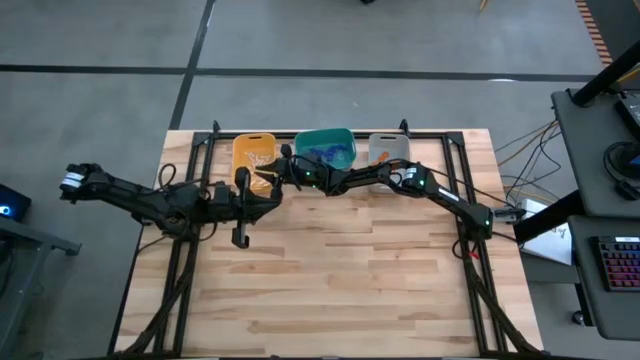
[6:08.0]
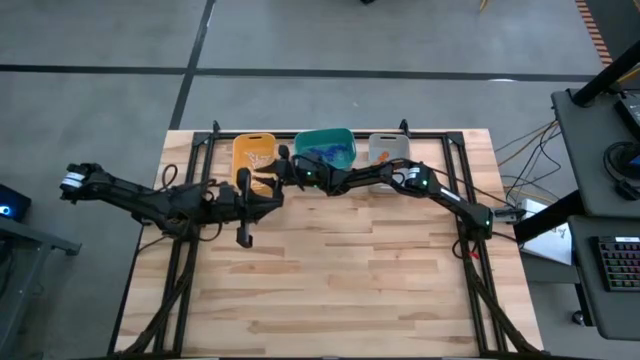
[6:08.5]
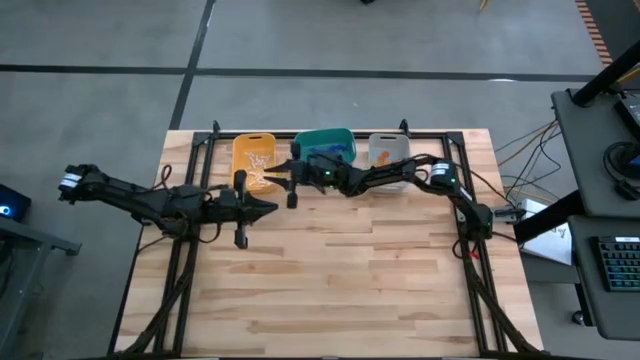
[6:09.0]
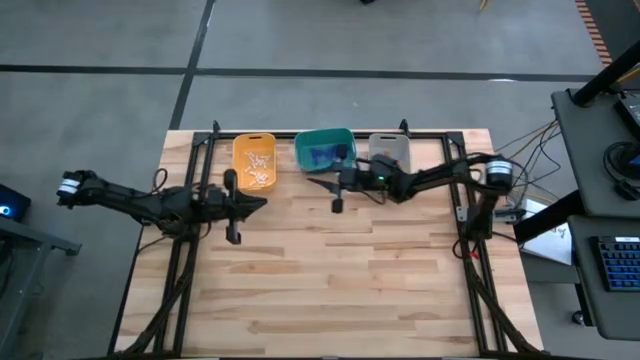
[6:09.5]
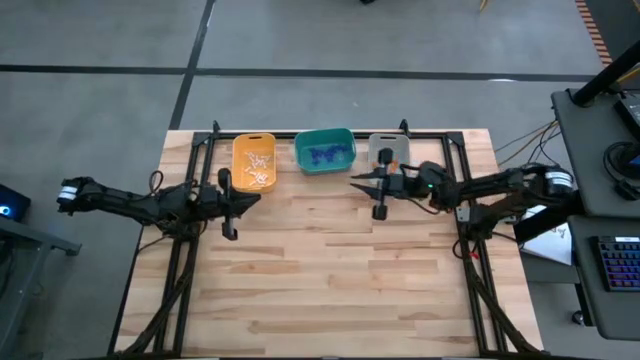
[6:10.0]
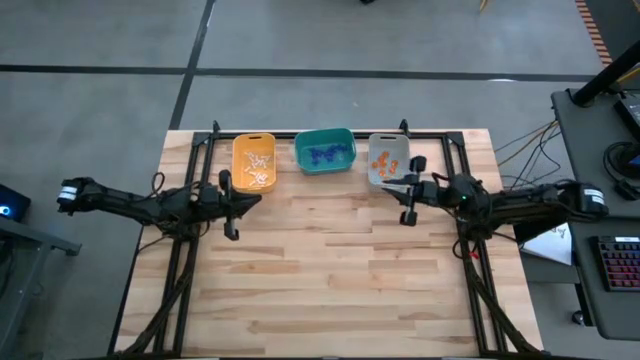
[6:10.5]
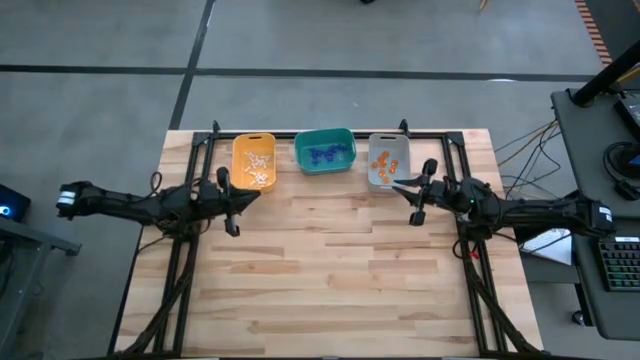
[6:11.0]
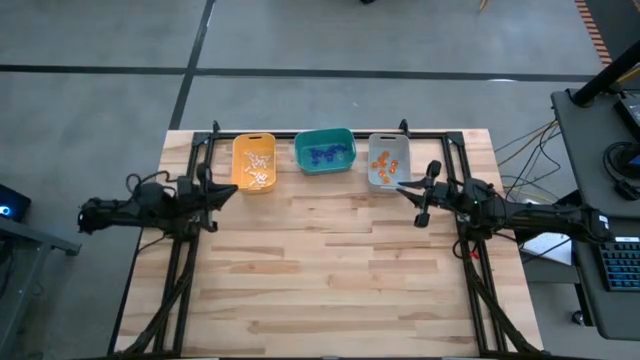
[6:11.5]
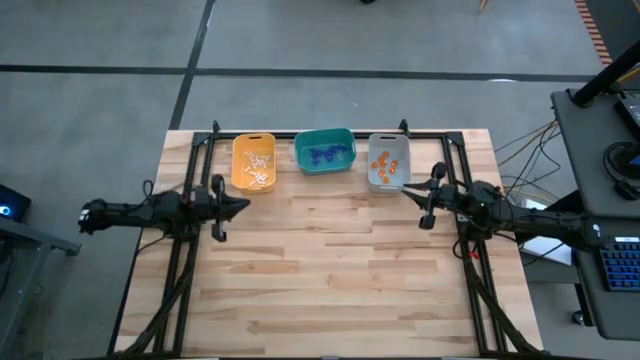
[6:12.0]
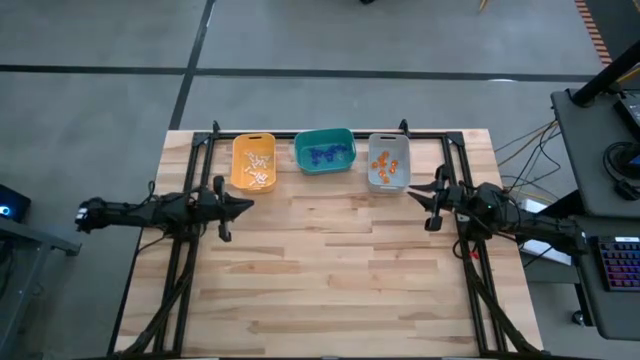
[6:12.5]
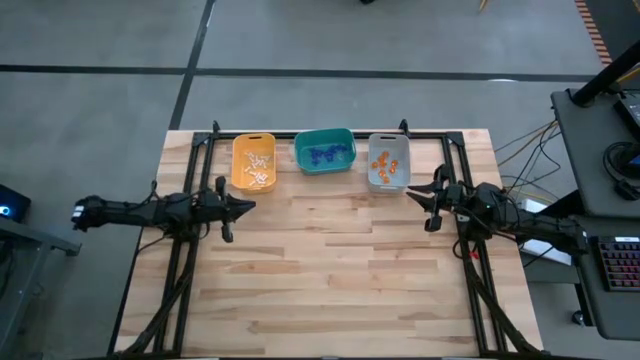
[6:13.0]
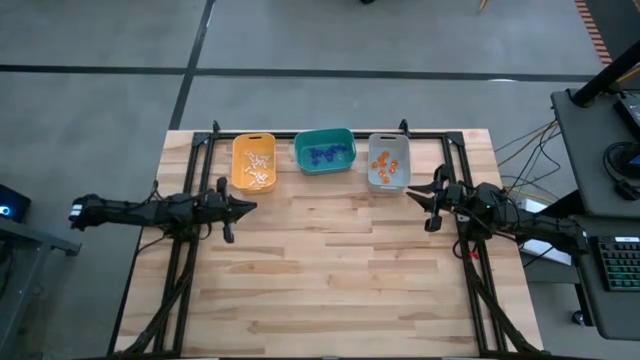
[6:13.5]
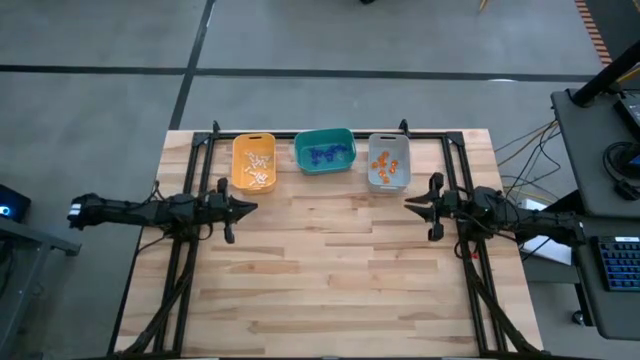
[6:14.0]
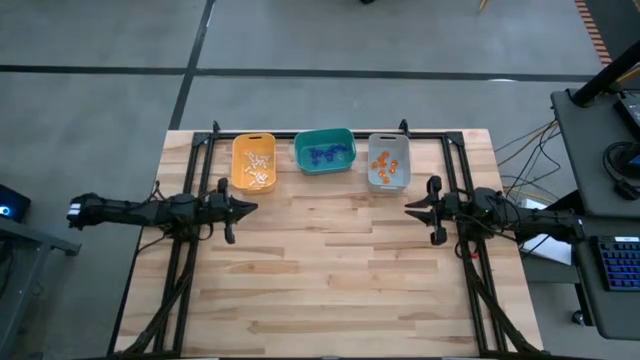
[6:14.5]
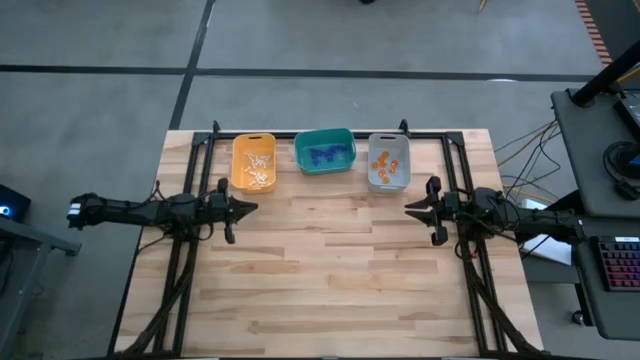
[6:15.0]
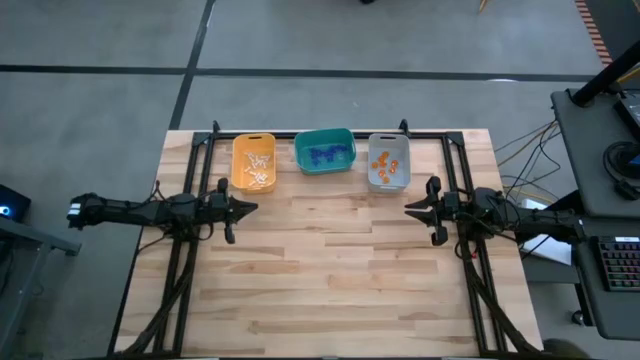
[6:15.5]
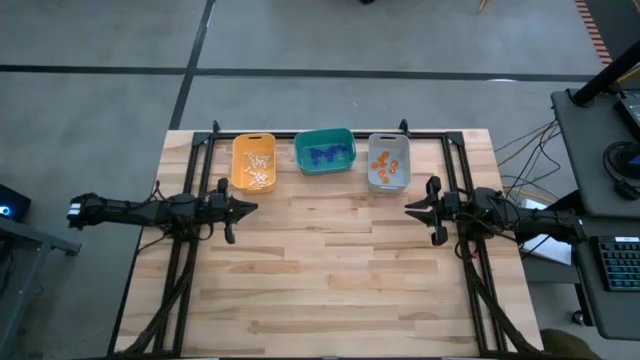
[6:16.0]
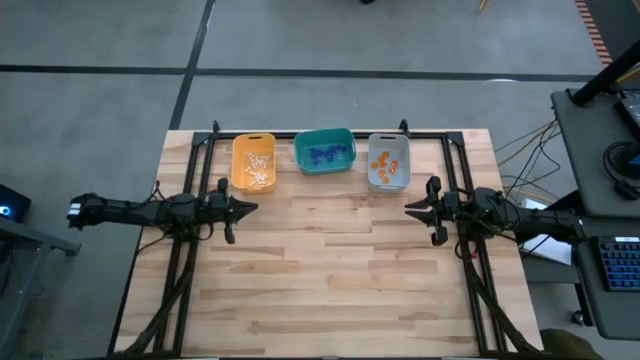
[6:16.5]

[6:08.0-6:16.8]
Task: Sort Halloween decoration
Return to Home Position

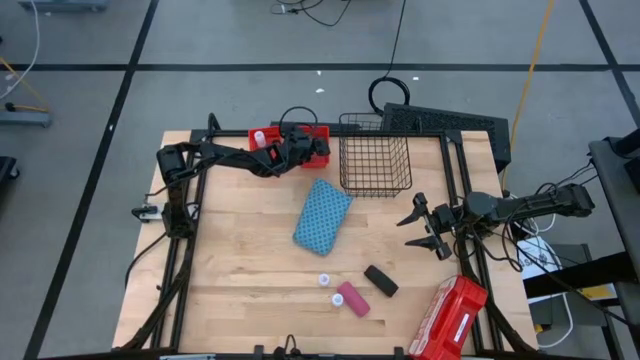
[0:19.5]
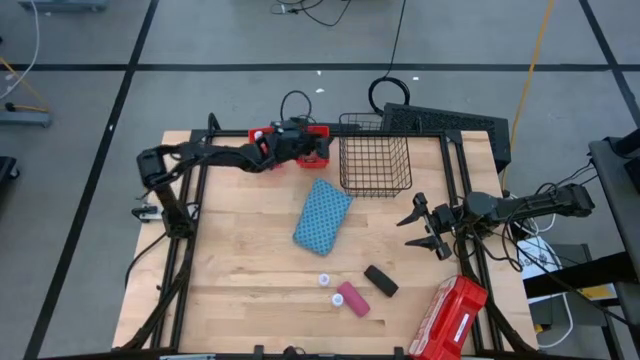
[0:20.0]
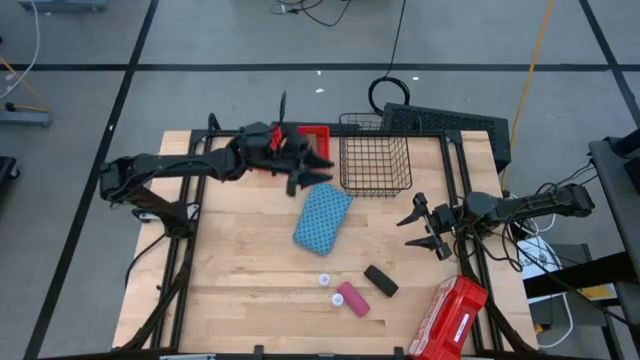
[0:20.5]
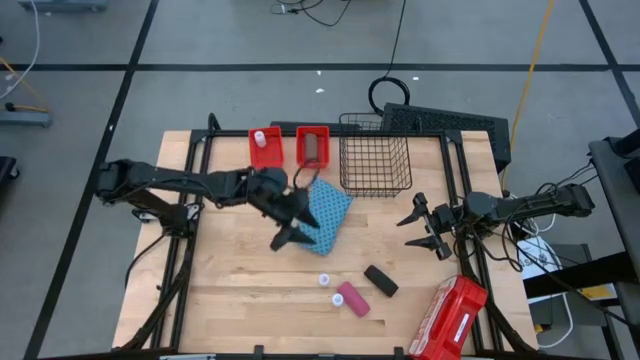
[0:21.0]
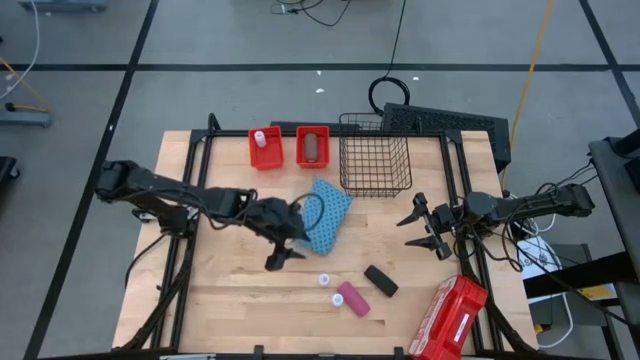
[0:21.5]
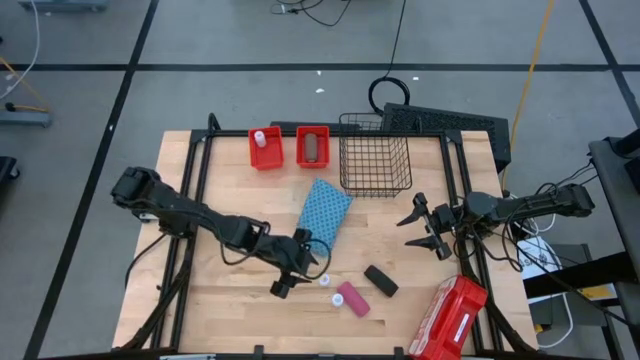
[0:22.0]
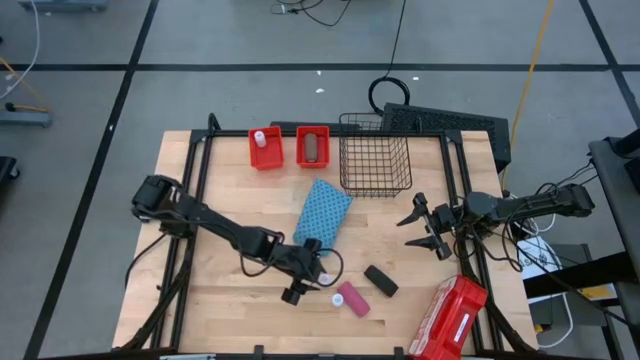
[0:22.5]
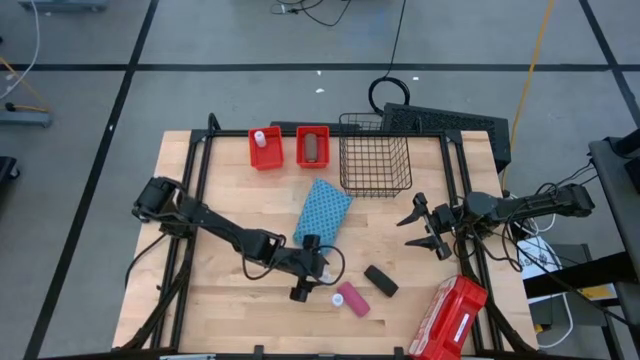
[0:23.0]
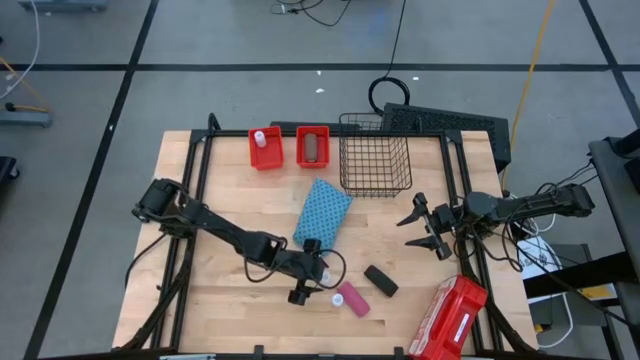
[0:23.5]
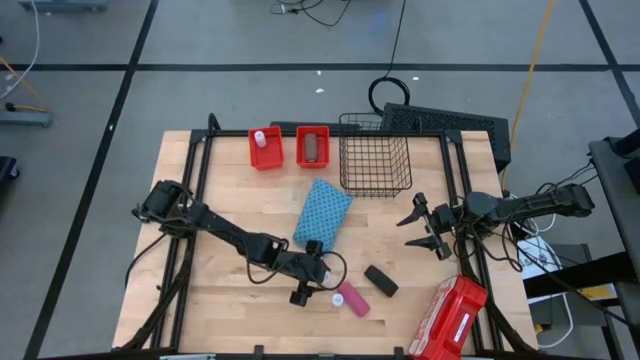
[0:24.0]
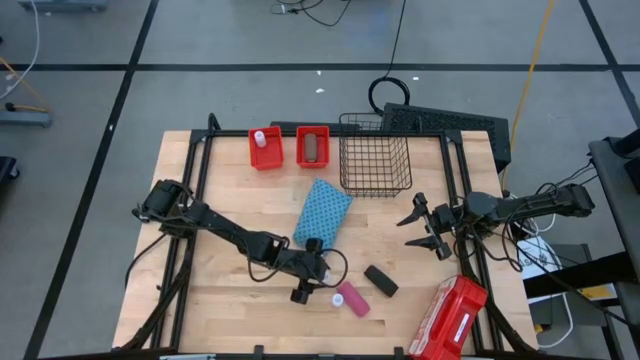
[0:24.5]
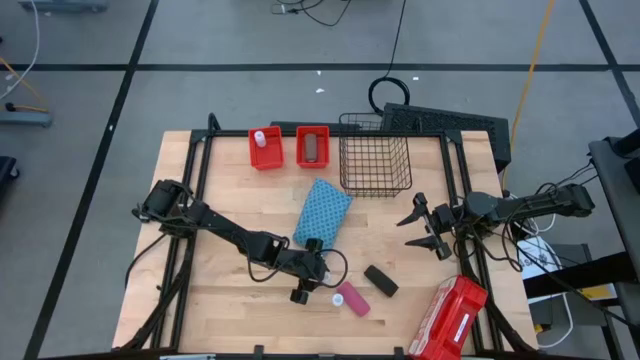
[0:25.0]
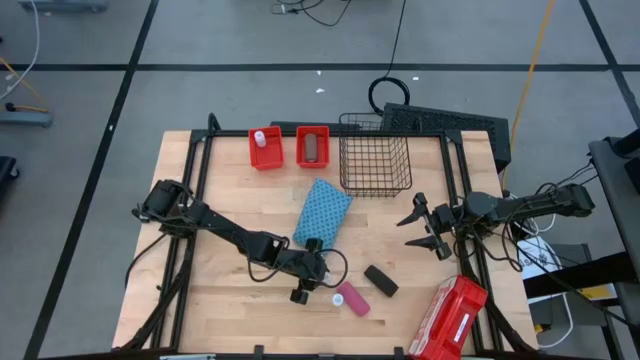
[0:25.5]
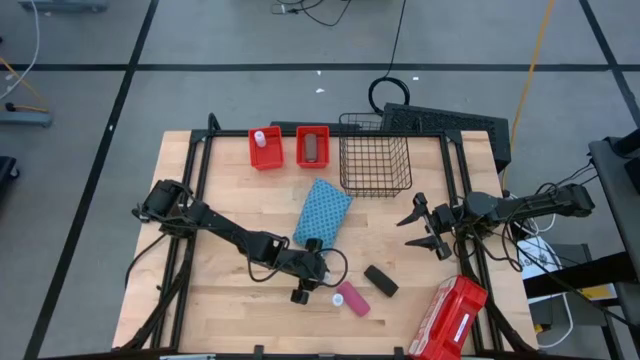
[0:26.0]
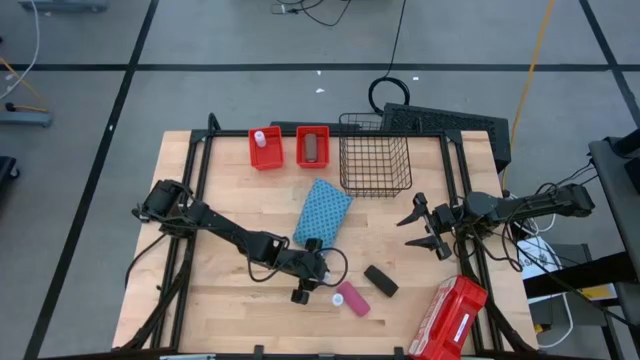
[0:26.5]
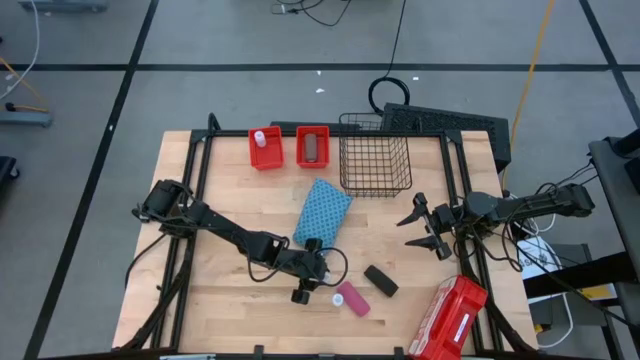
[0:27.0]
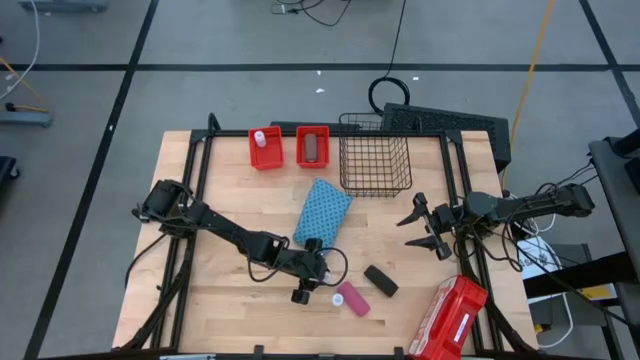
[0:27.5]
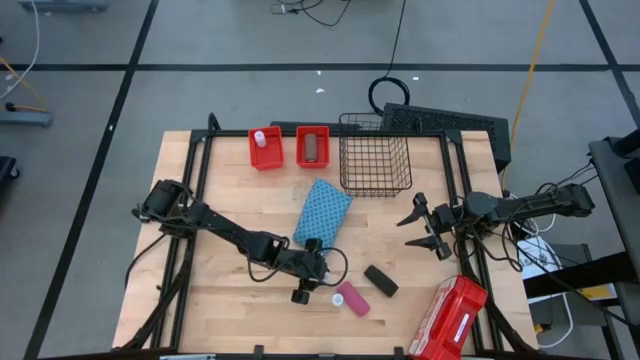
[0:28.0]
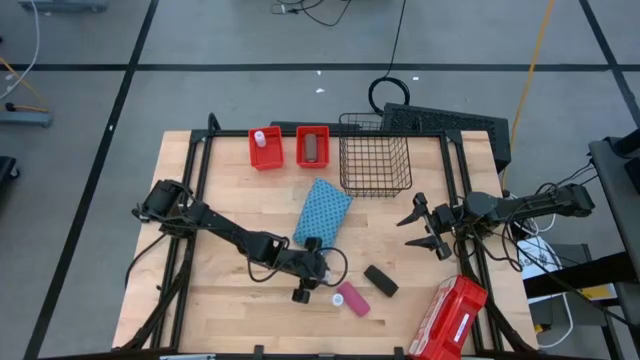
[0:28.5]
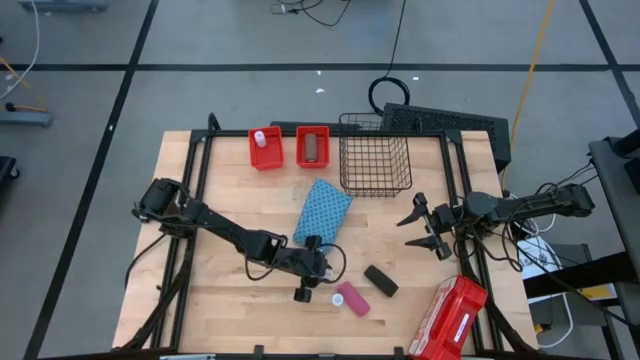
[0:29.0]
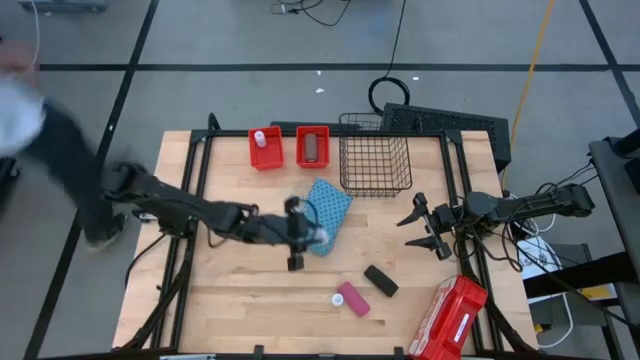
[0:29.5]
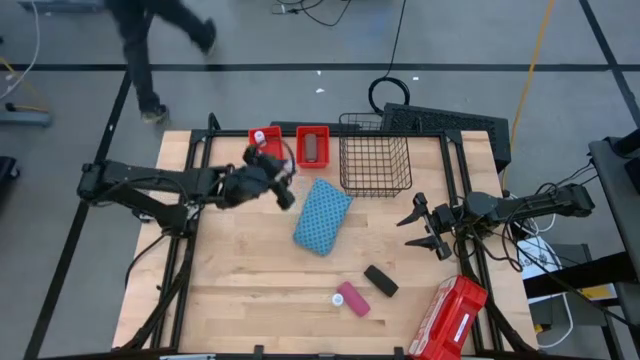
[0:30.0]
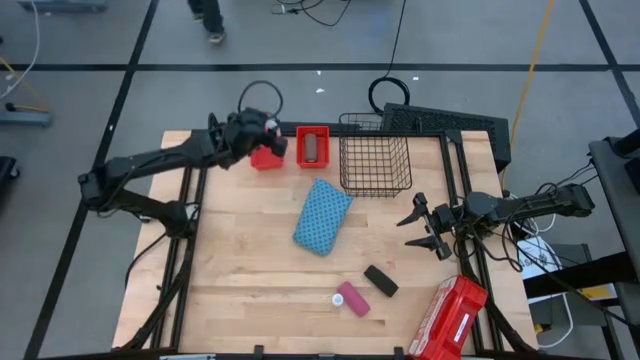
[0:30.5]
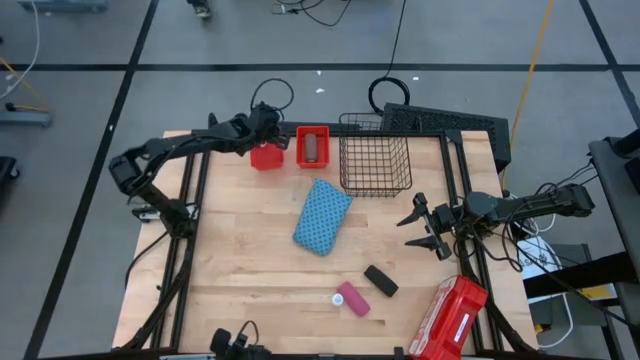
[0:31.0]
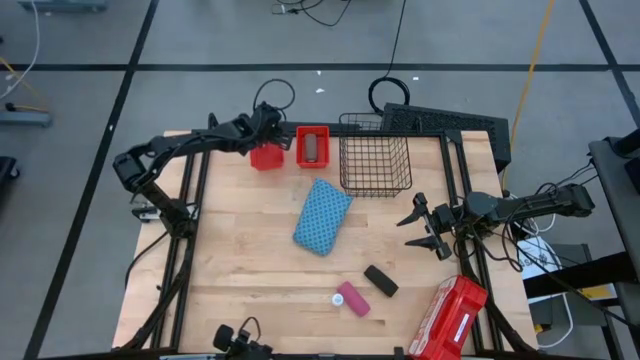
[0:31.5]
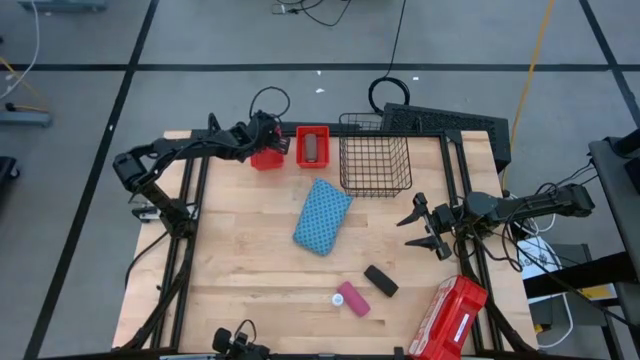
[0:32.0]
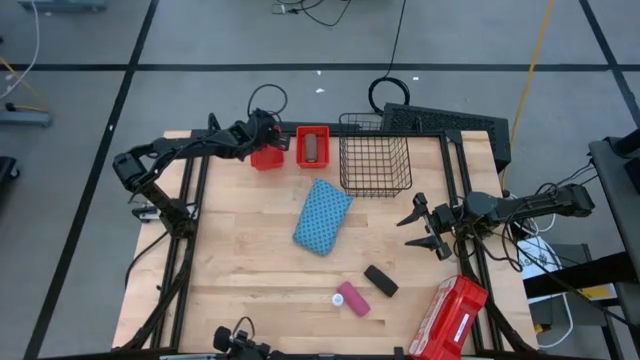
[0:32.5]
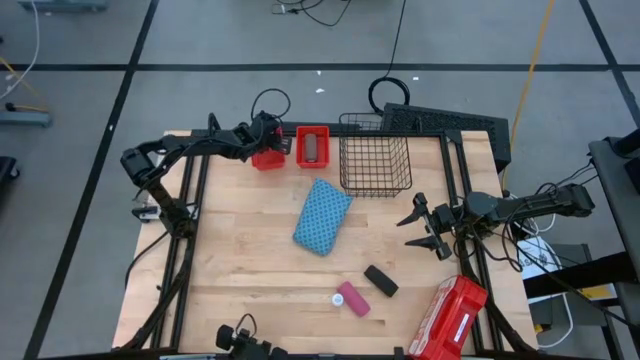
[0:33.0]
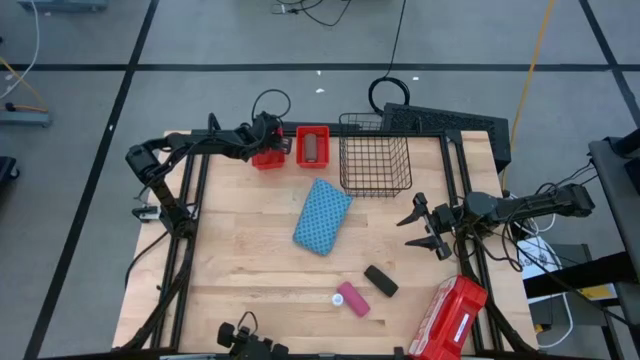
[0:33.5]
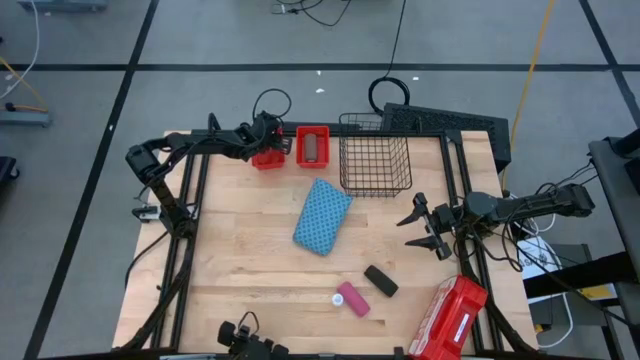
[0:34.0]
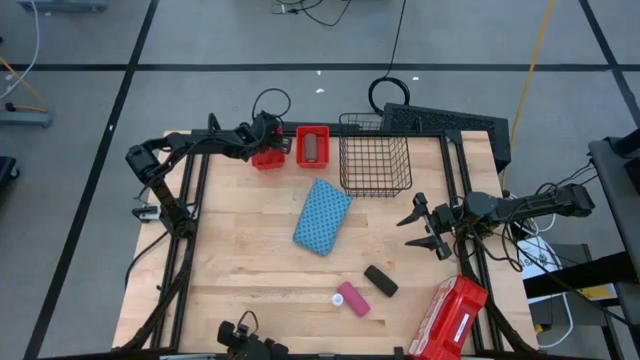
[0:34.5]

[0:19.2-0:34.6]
Task: Pick & Place Medicine items
Put the transparent pill bottle into the left orange basket
